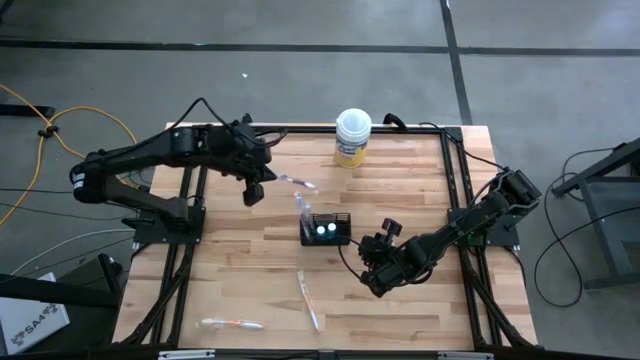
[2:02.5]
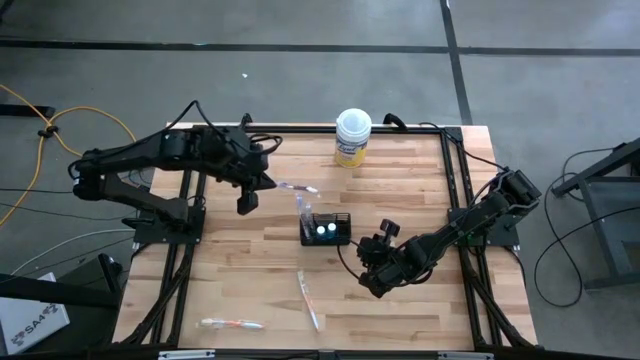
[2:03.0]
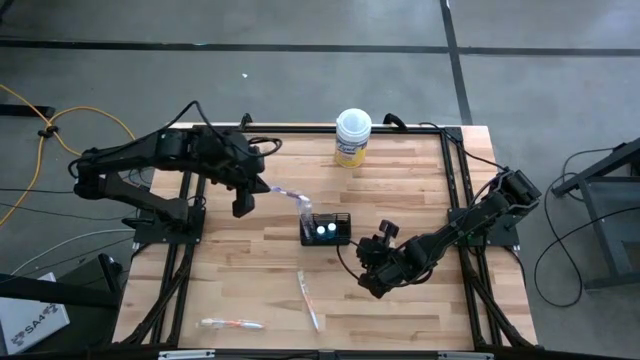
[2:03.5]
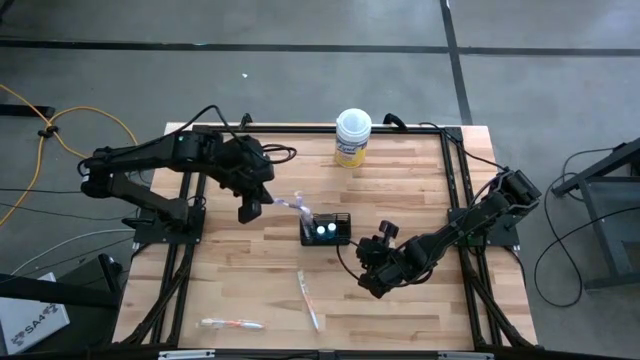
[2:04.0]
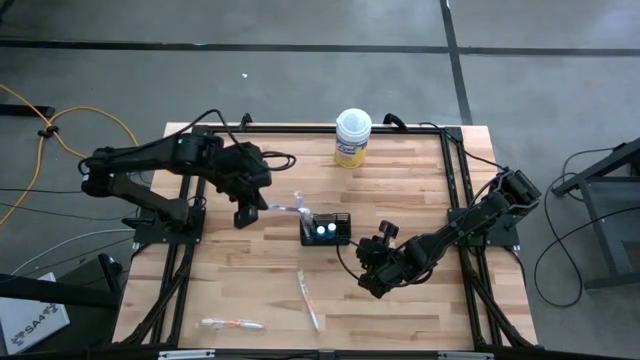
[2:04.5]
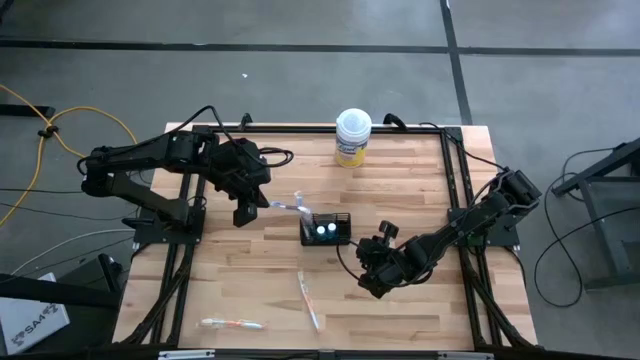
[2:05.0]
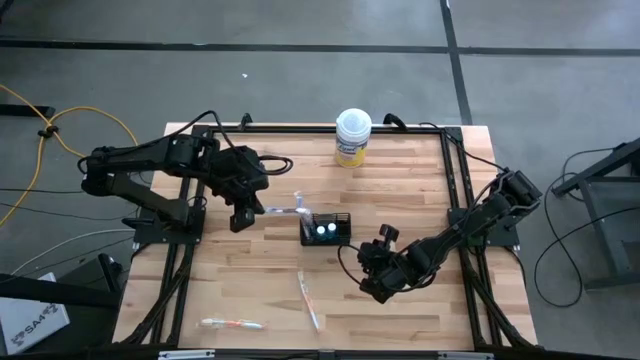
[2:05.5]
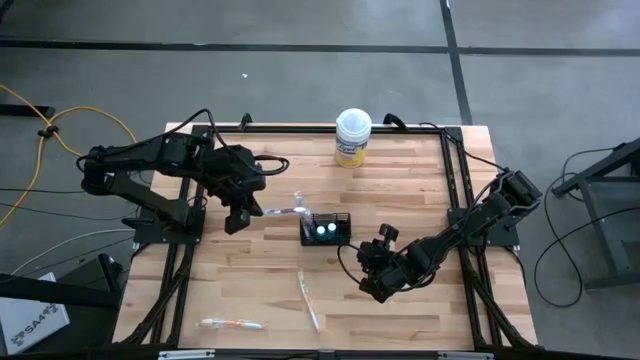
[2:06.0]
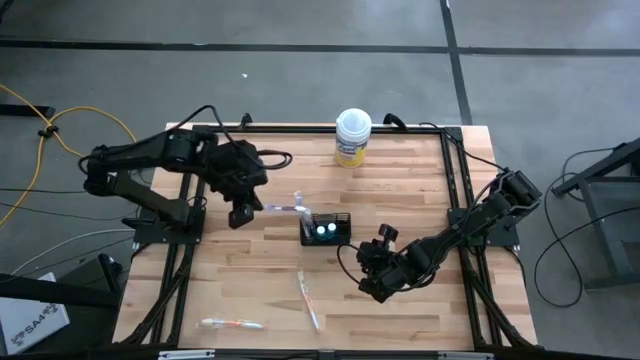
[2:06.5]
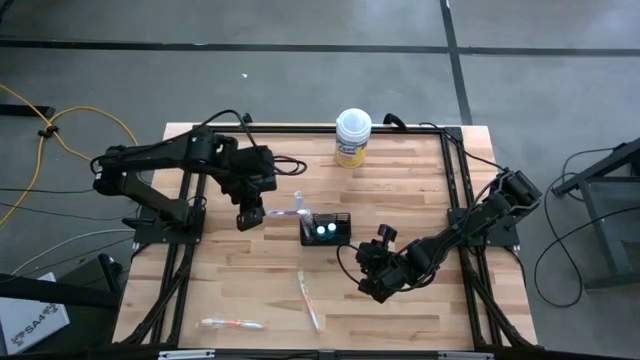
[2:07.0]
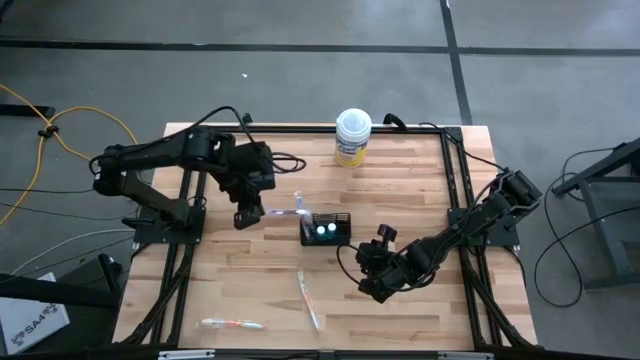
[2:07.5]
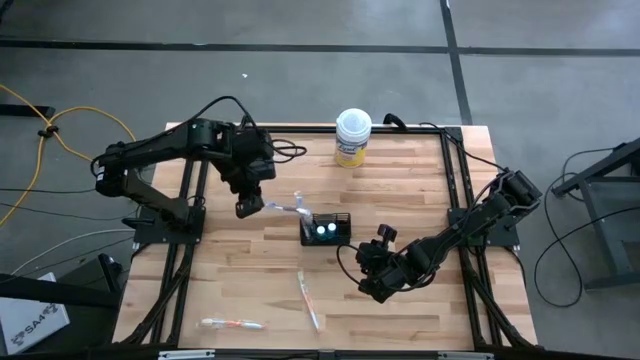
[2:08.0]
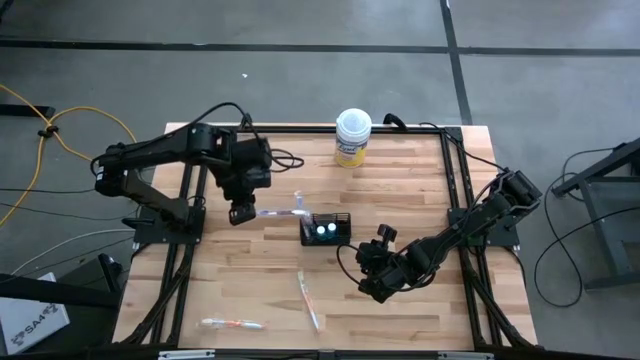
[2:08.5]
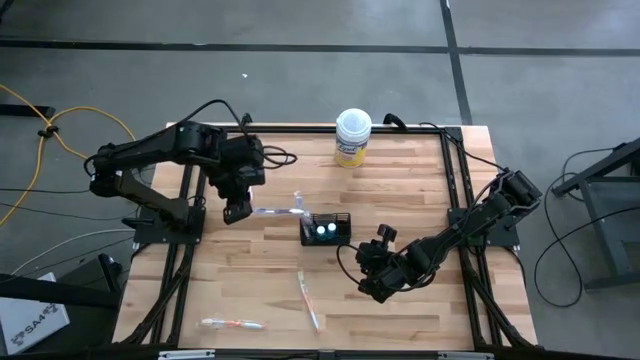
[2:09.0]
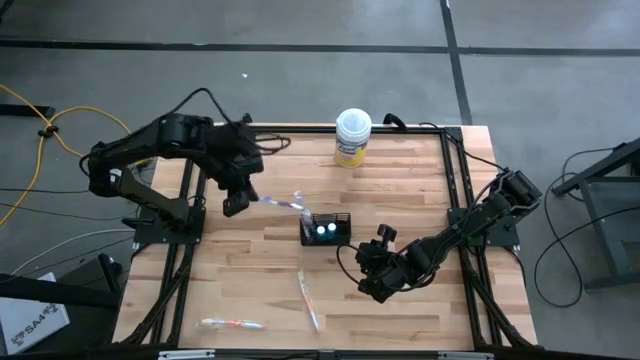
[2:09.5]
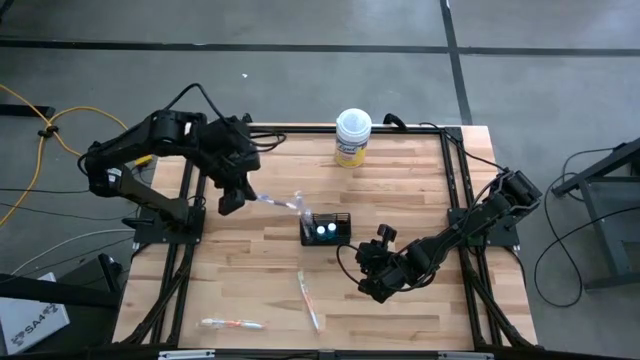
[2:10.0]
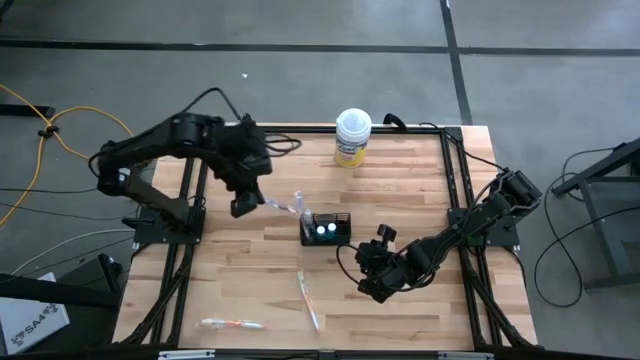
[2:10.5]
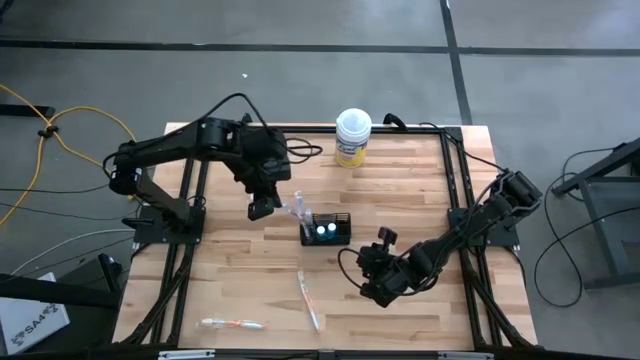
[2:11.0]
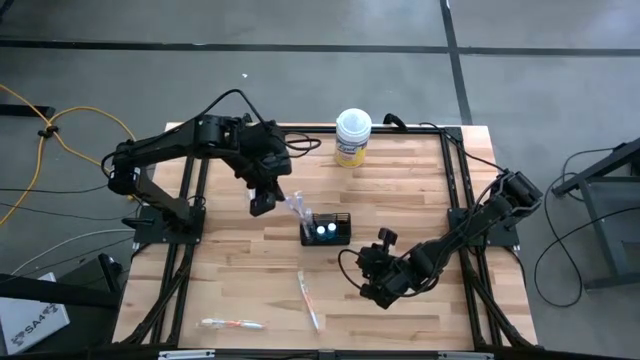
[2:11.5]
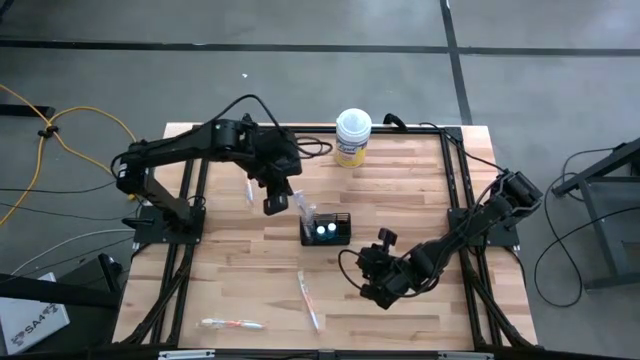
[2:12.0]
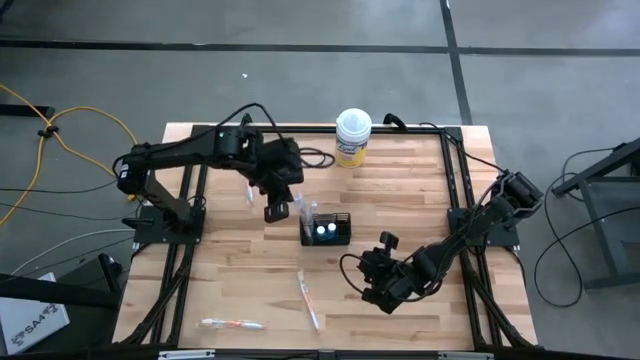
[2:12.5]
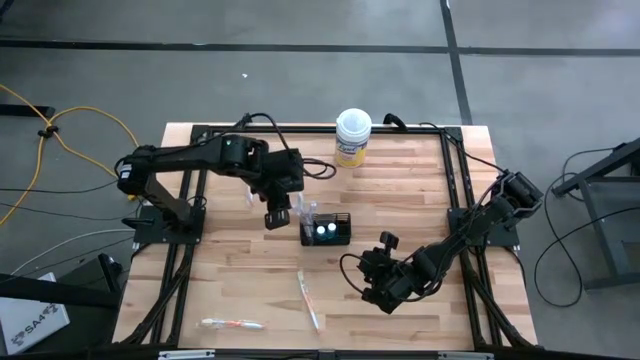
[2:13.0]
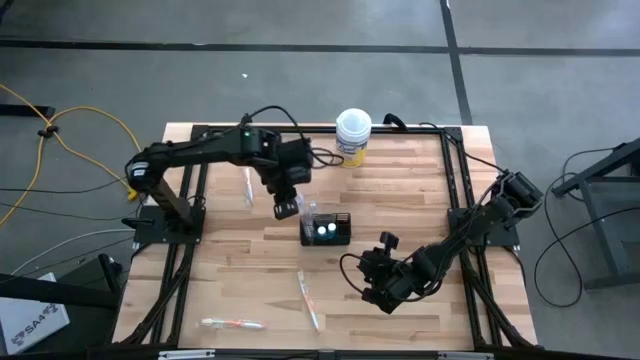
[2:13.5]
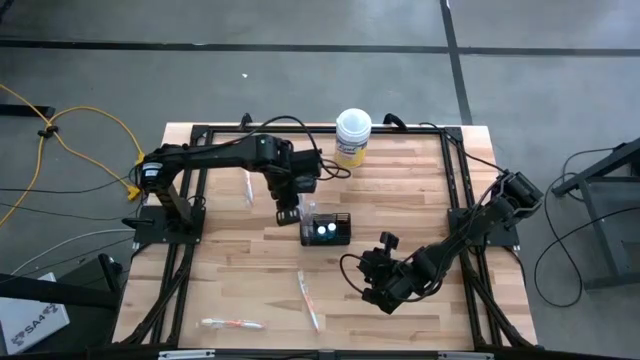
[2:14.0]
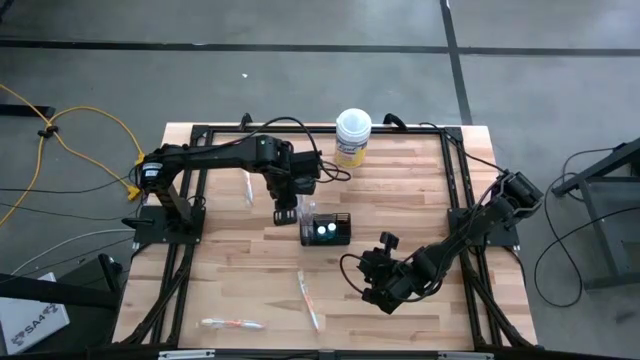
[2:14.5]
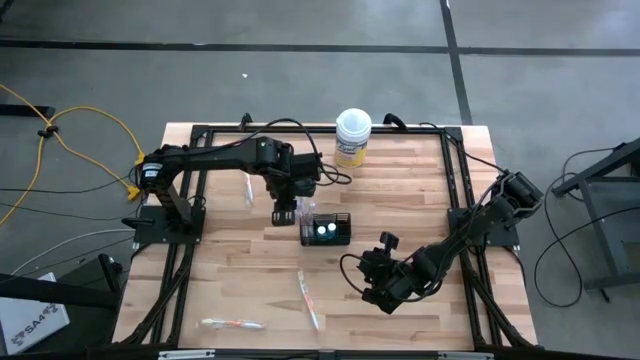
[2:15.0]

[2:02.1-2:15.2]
Task: Pick & Place toothbrushing station
Put the purple toothbrush into the wire organizer

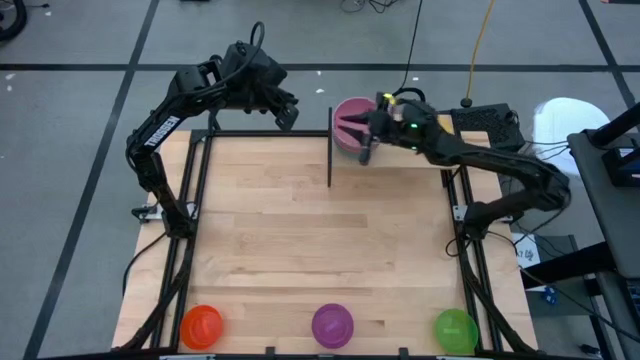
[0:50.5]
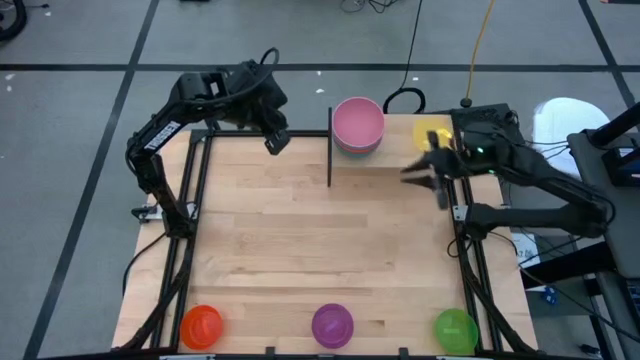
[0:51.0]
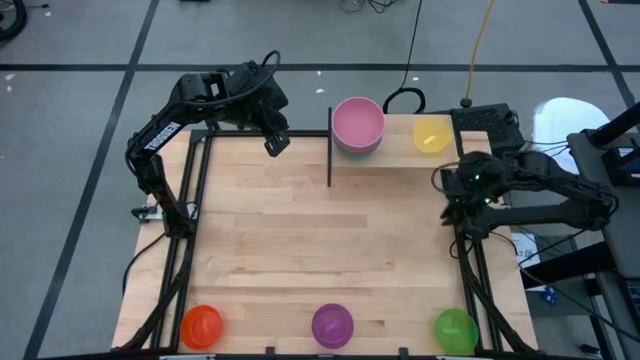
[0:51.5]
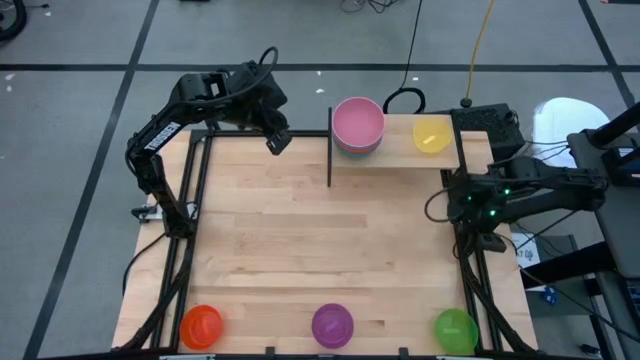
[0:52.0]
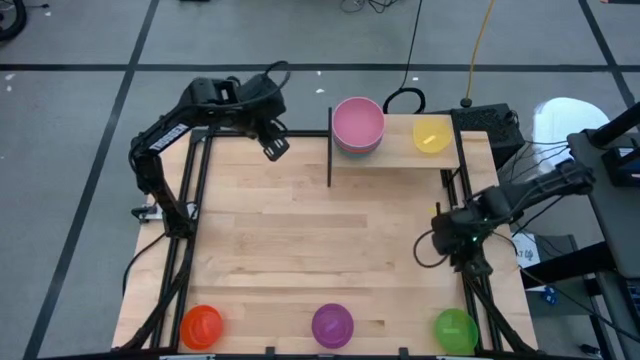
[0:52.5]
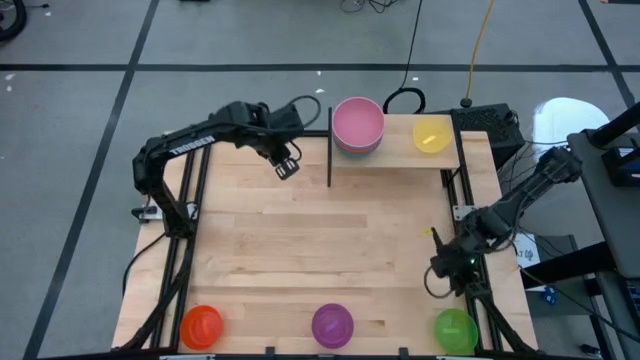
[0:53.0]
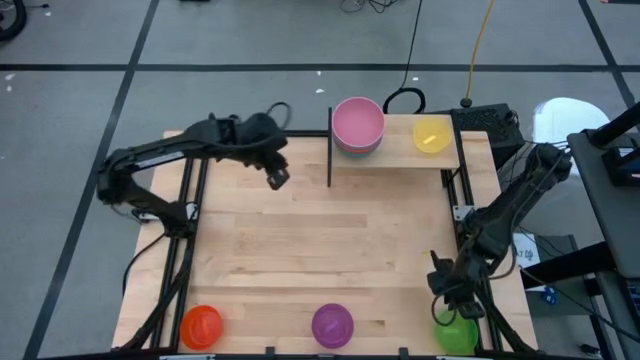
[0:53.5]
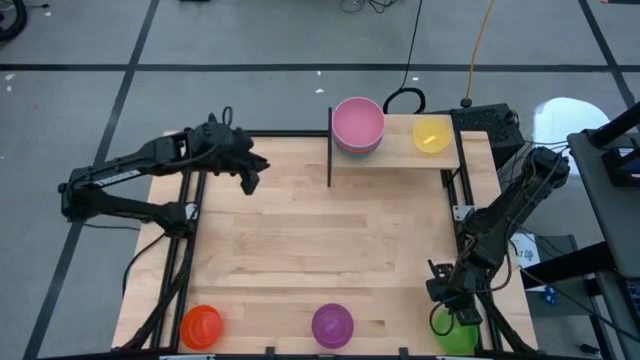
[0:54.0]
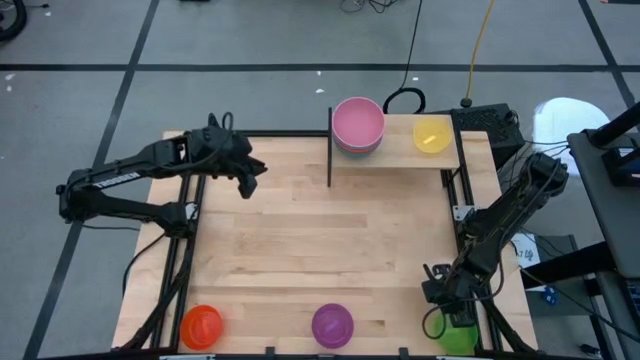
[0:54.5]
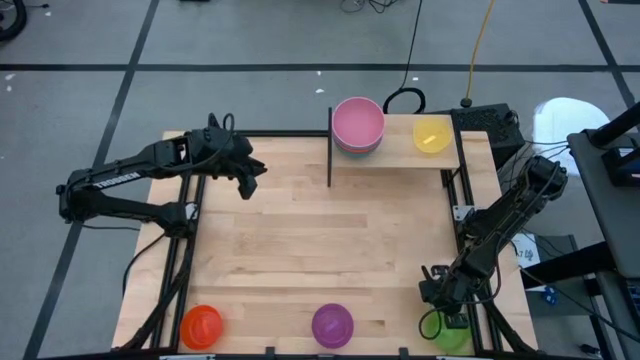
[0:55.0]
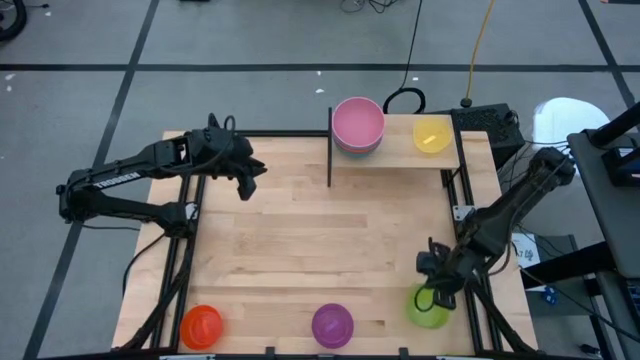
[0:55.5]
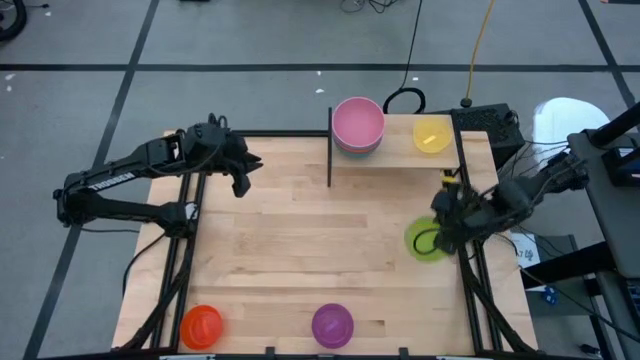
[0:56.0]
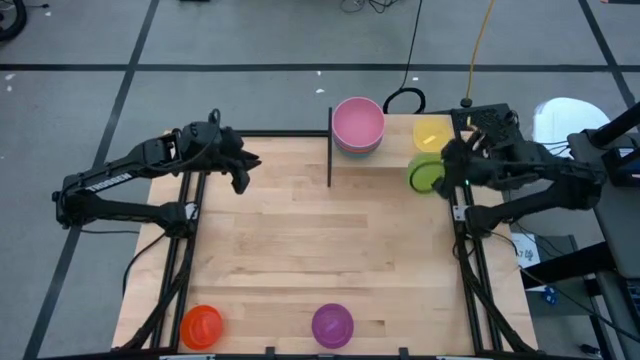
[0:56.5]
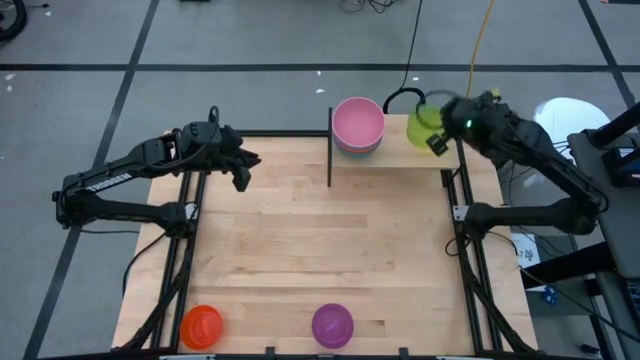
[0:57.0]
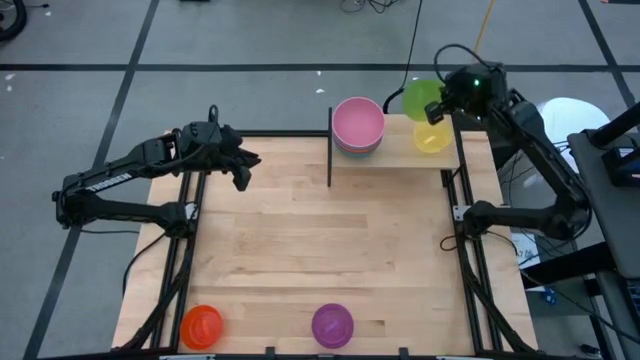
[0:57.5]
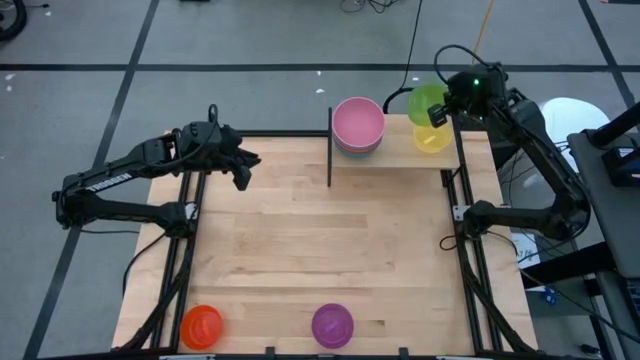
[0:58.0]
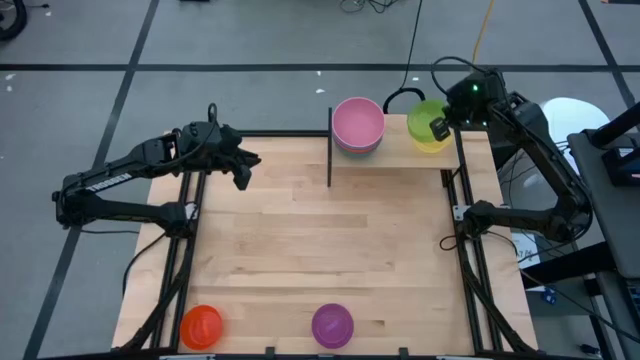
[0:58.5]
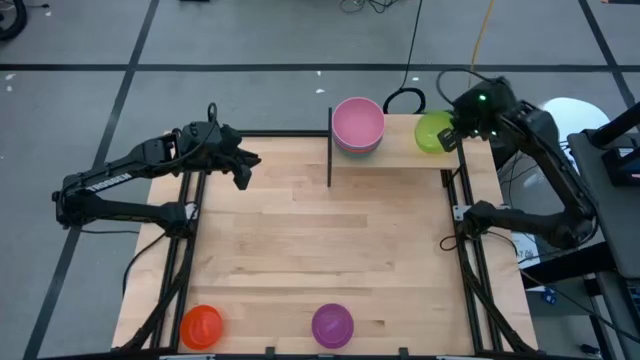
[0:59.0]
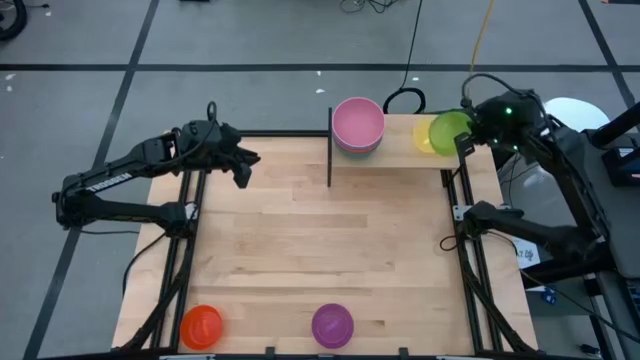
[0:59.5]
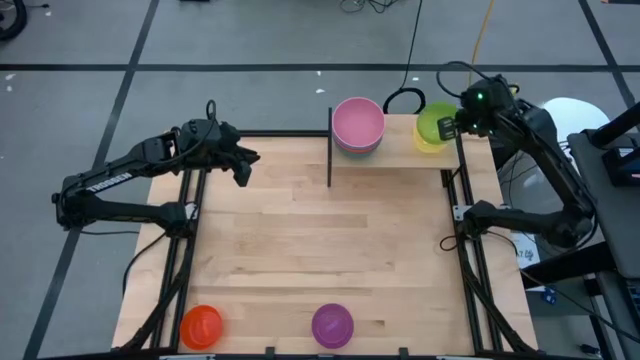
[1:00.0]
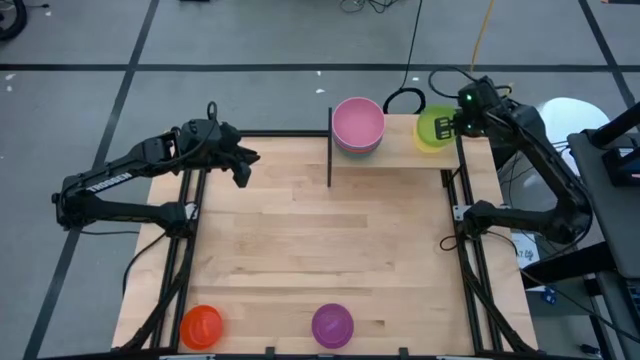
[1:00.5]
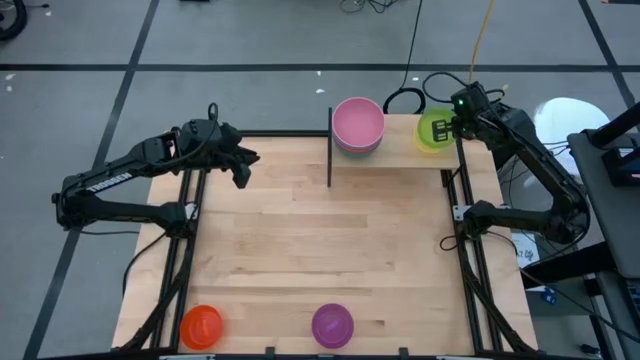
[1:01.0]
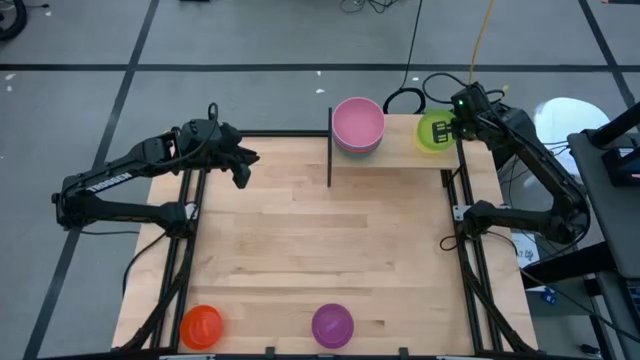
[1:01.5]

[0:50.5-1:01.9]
Task: Place and stack bowls onto a shelf
Stack the green bowl on top of the yellow bowl on the shelf
